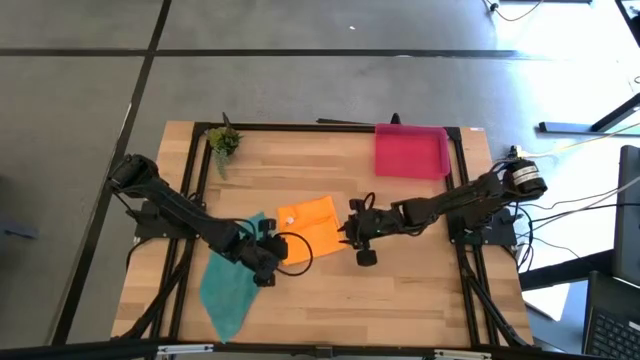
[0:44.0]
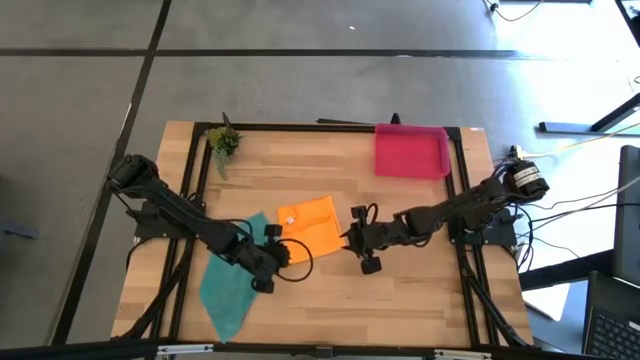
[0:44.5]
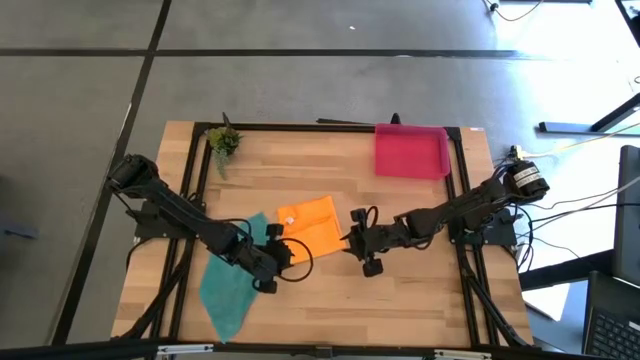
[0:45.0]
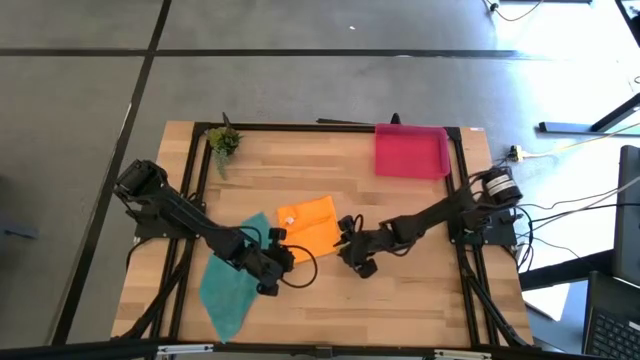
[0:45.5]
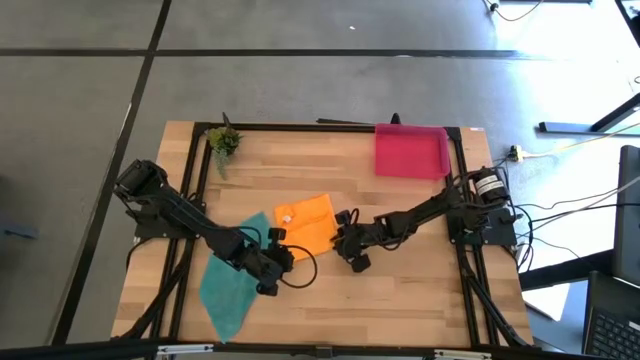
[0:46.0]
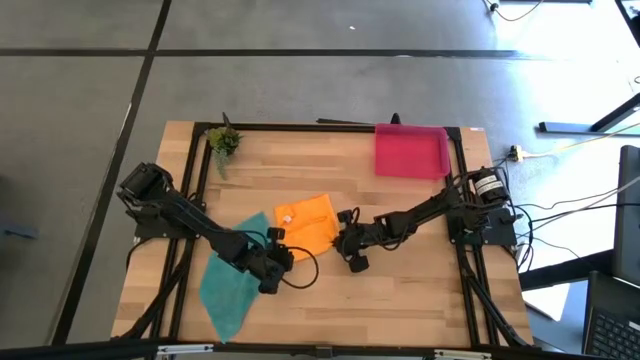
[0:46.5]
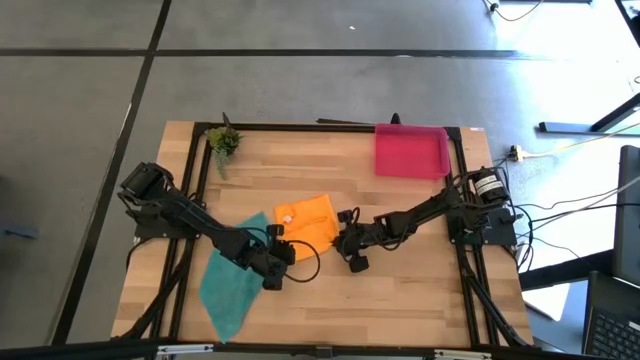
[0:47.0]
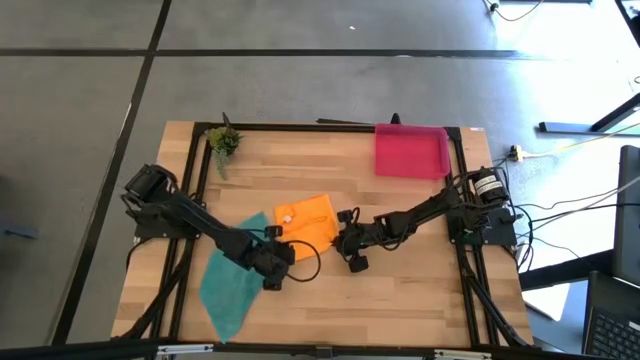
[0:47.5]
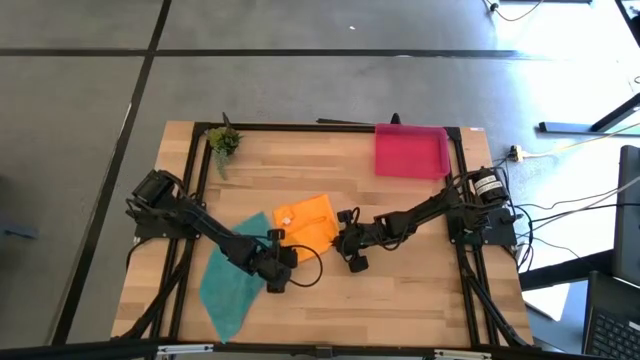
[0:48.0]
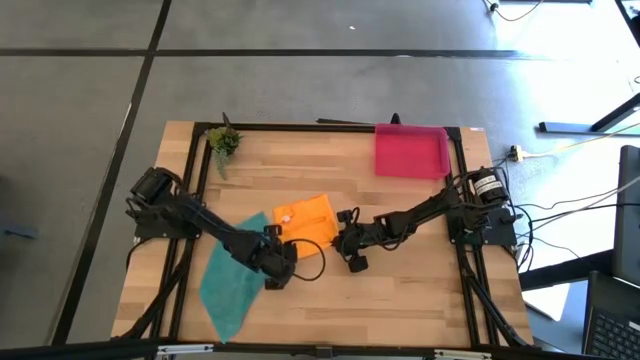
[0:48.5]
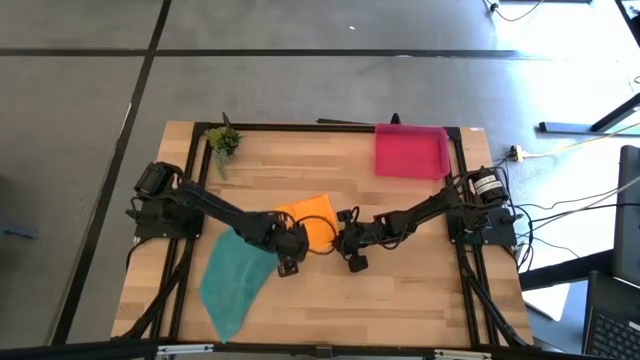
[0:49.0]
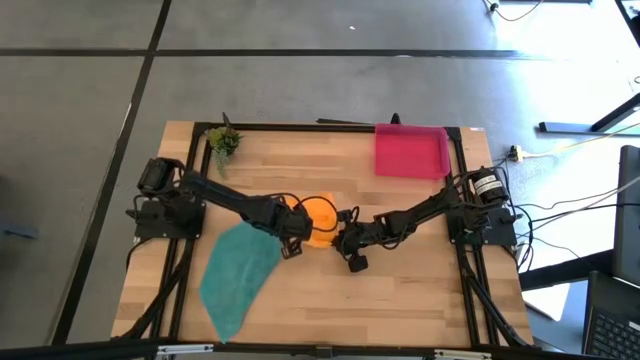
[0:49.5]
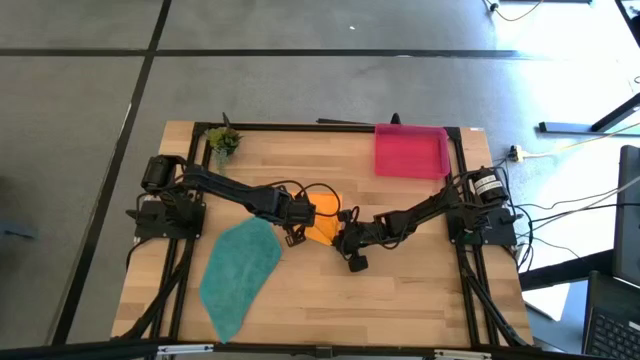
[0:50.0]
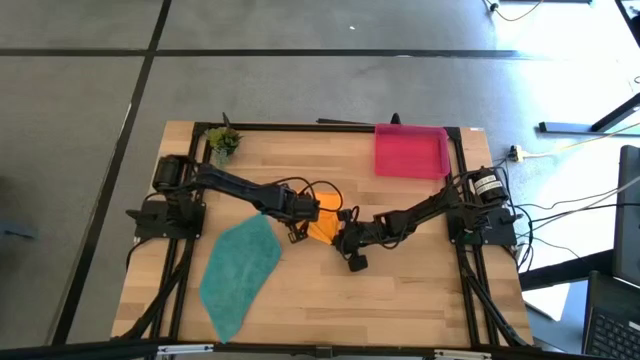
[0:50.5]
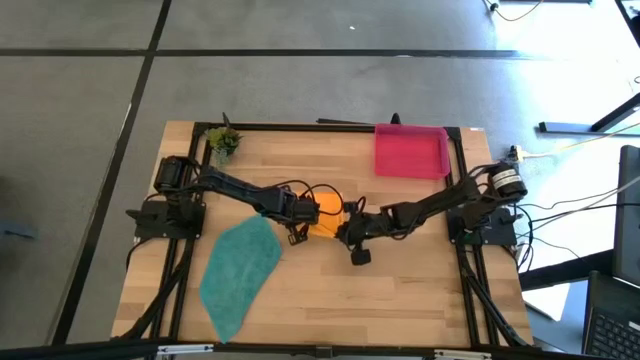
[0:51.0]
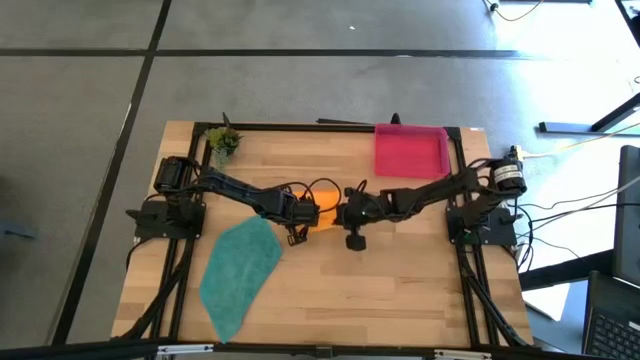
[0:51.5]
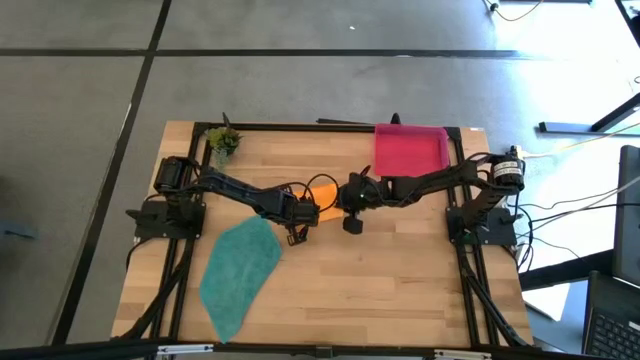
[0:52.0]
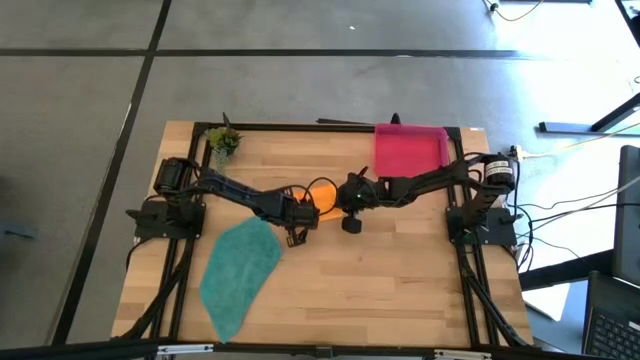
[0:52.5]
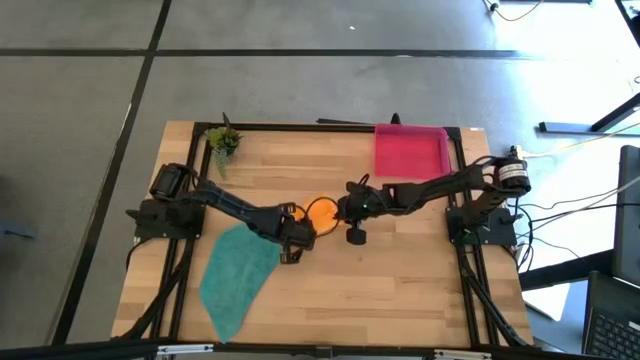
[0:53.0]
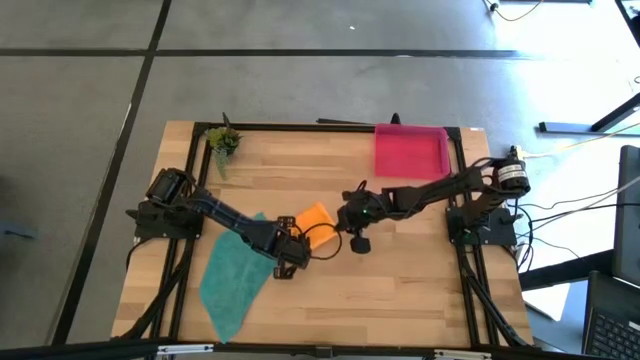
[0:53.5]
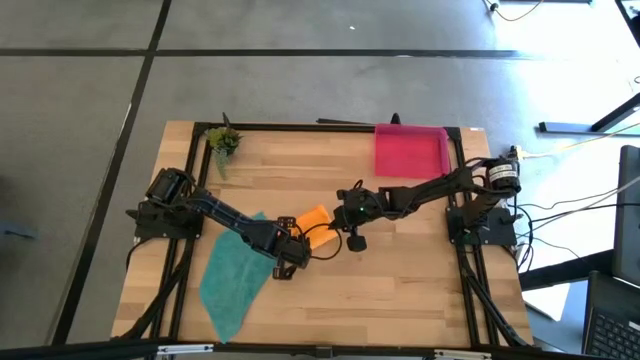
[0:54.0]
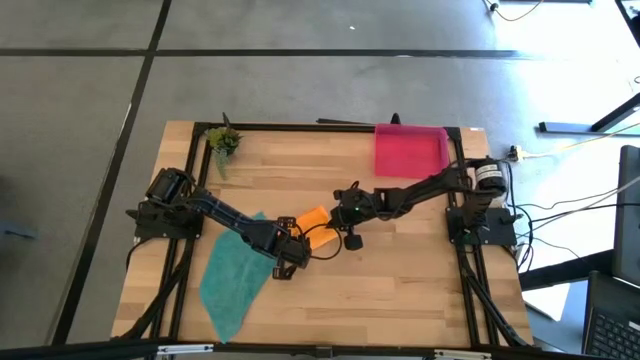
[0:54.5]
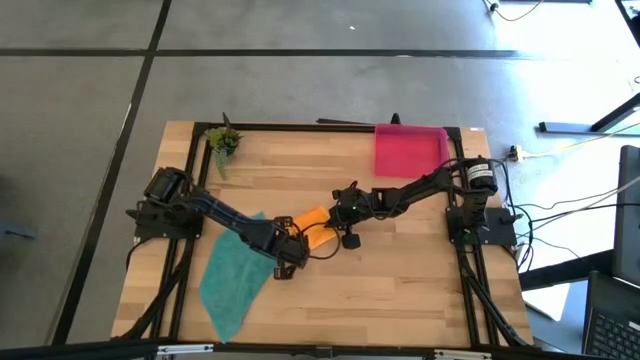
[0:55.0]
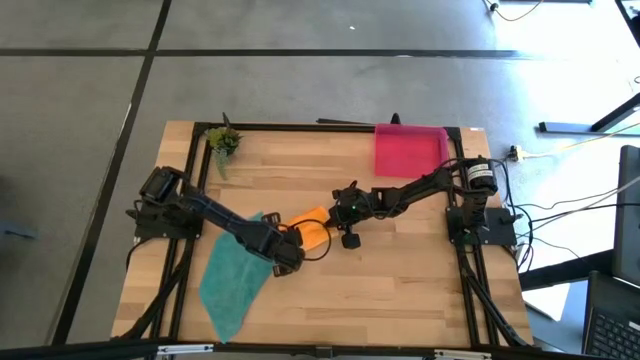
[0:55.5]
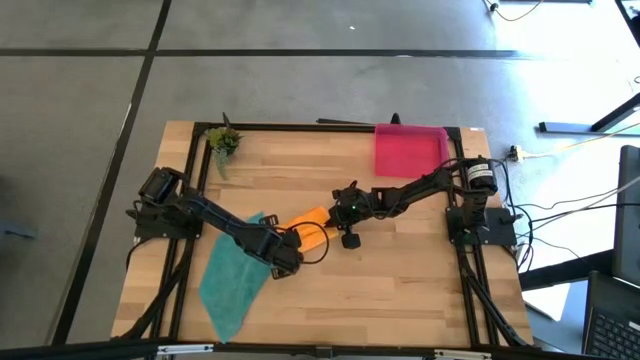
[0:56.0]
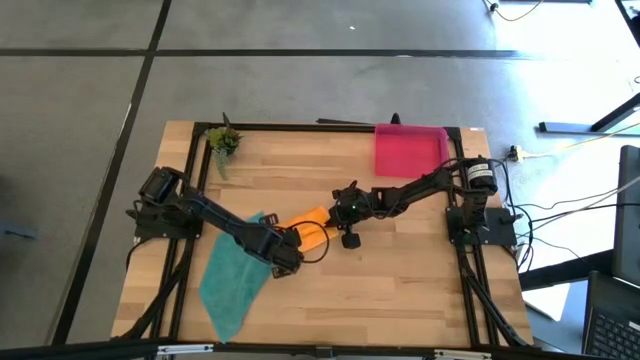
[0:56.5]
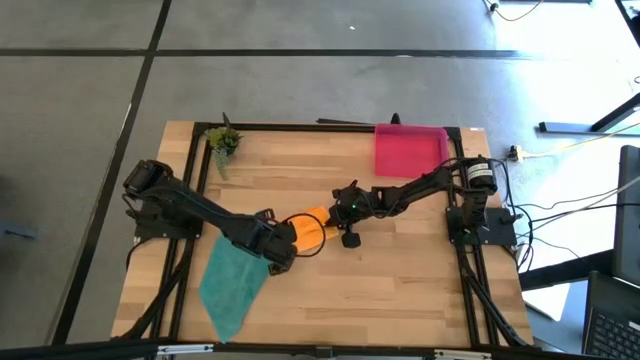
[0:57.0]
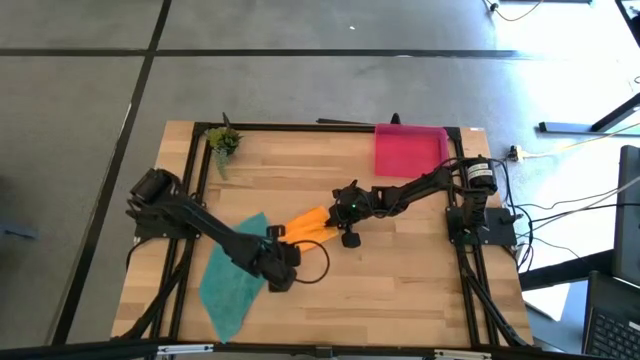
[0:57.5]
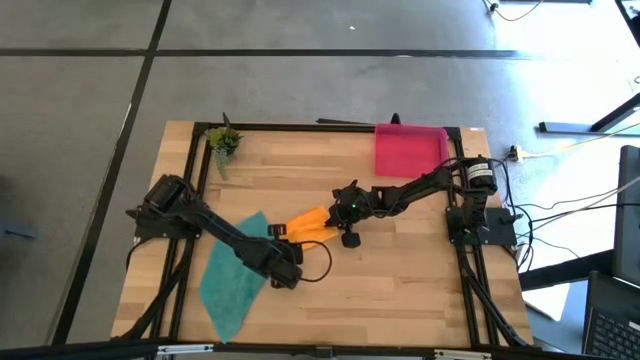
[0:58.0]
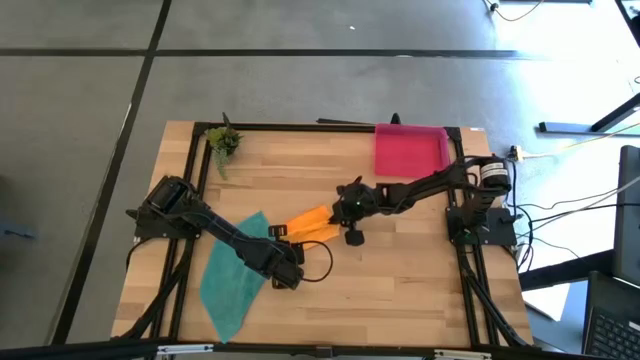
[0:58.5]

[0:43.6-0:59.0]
Task: Roll microfiber towels into tight, uniform cylinder then place into a basket
Roll the folded orange microfiber towel
